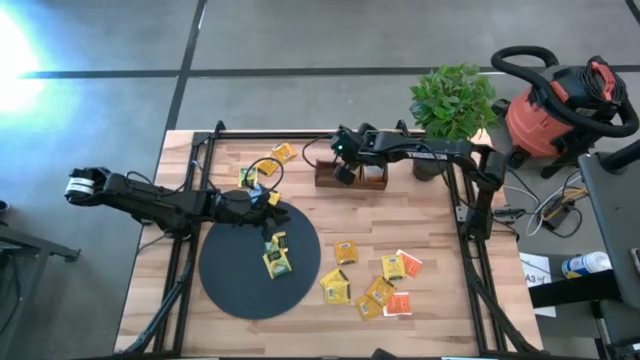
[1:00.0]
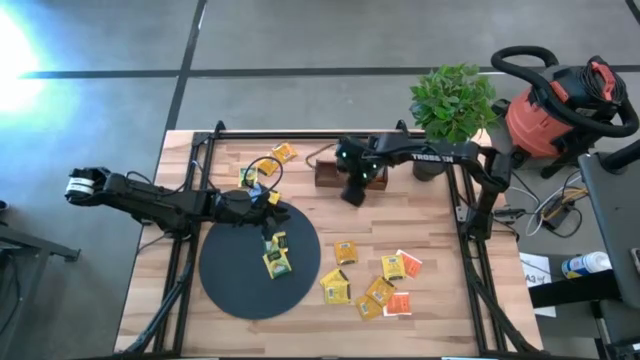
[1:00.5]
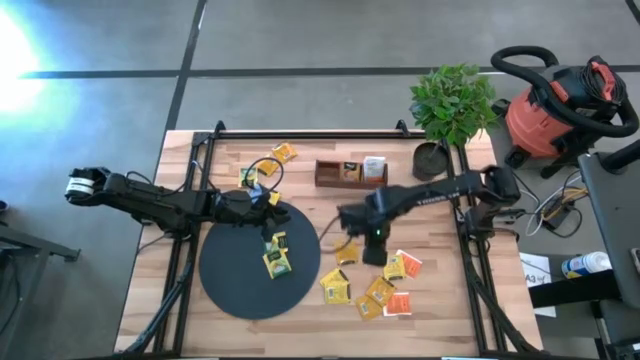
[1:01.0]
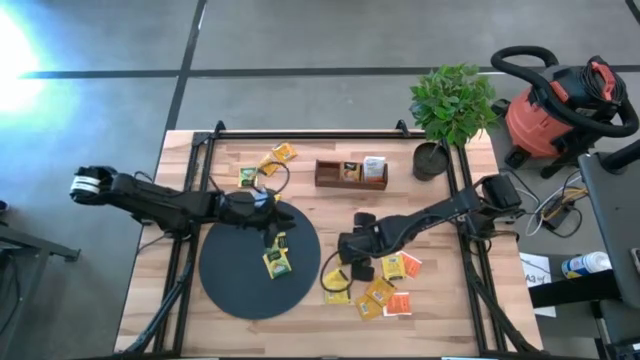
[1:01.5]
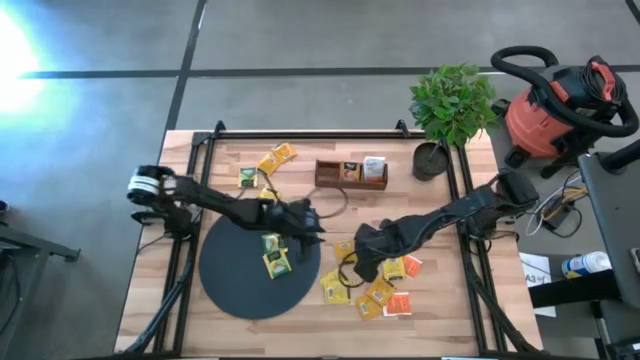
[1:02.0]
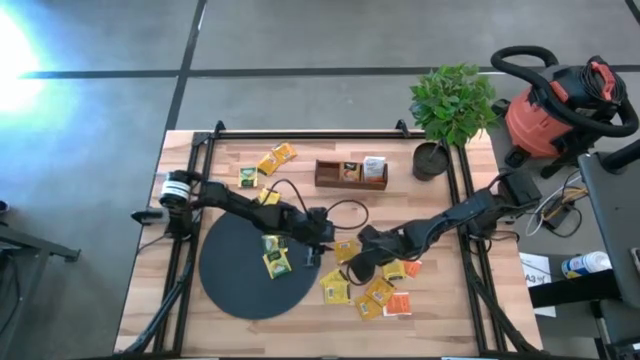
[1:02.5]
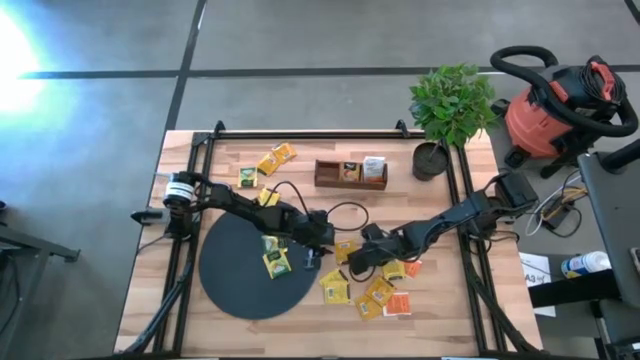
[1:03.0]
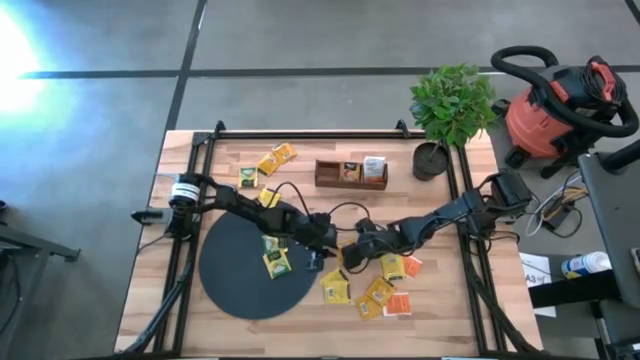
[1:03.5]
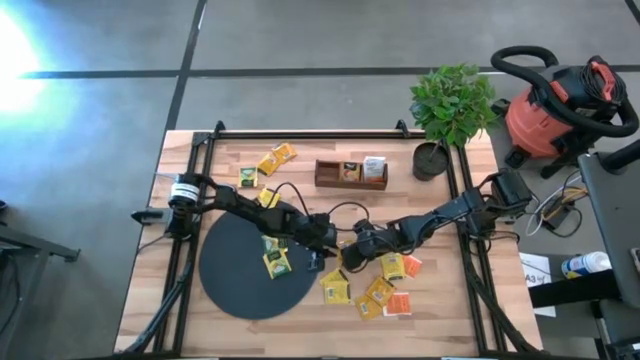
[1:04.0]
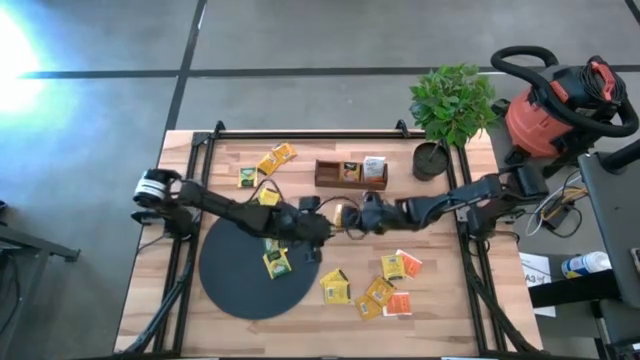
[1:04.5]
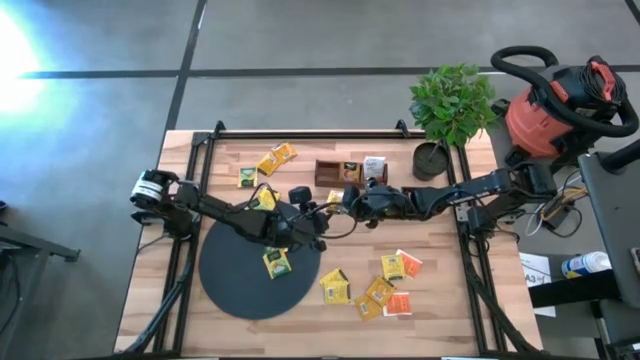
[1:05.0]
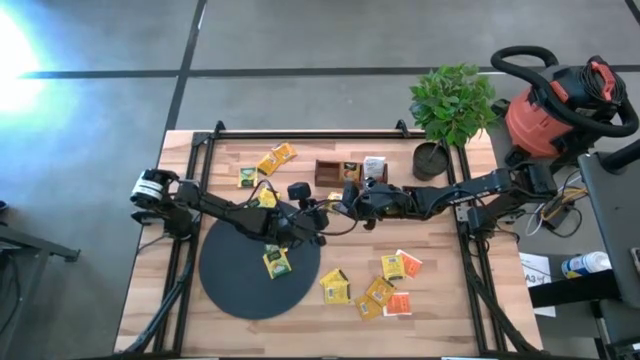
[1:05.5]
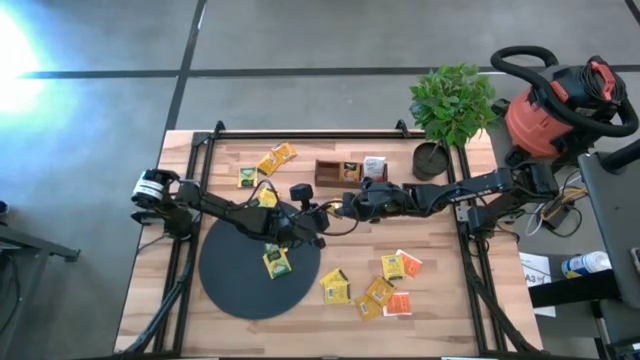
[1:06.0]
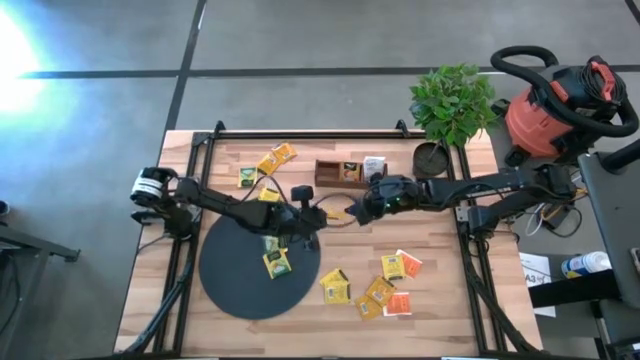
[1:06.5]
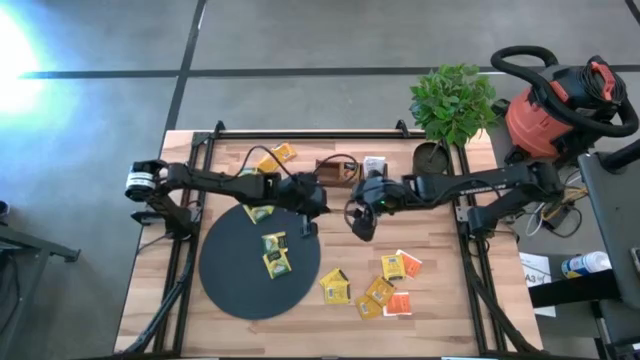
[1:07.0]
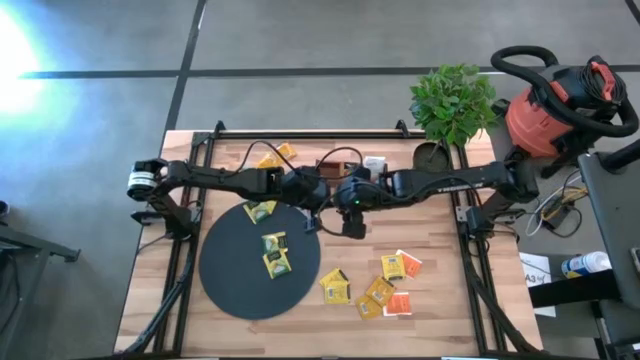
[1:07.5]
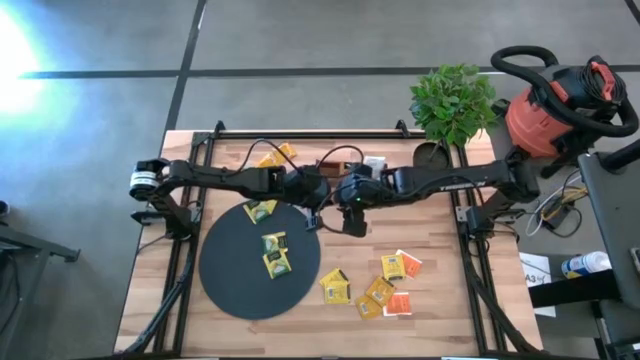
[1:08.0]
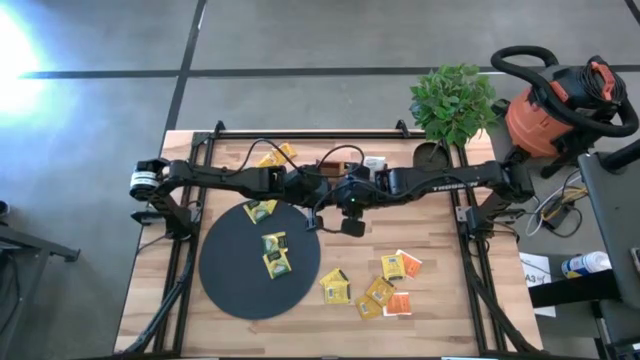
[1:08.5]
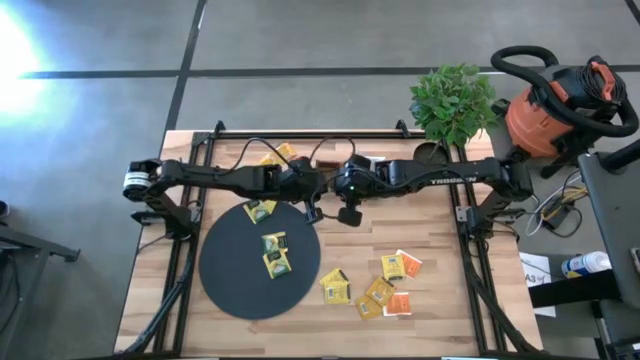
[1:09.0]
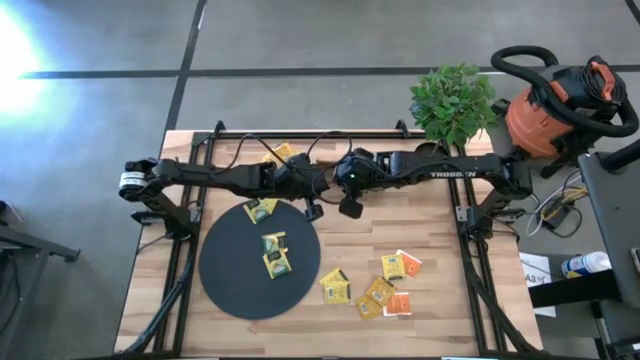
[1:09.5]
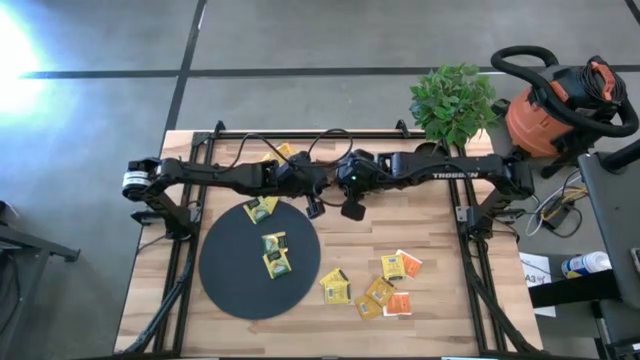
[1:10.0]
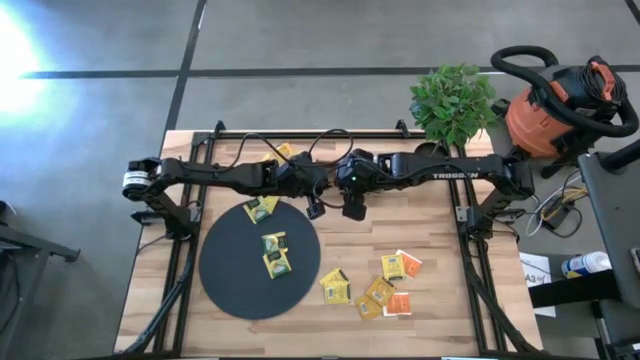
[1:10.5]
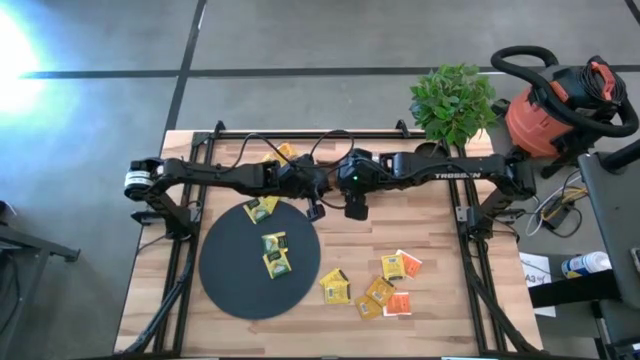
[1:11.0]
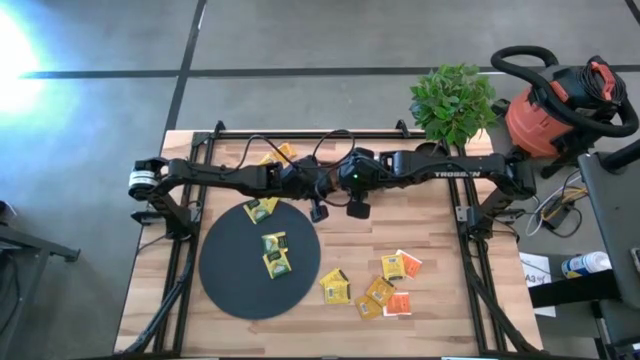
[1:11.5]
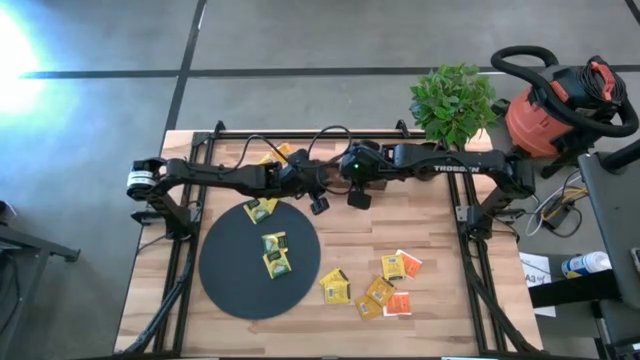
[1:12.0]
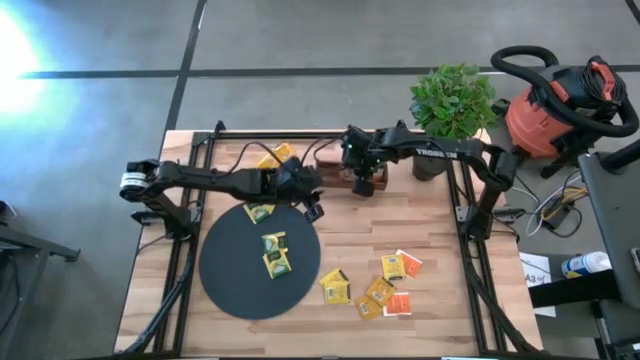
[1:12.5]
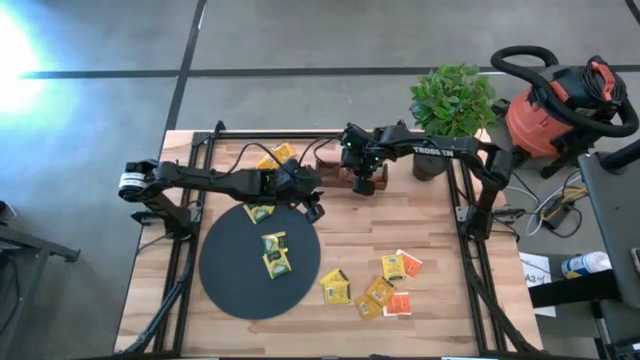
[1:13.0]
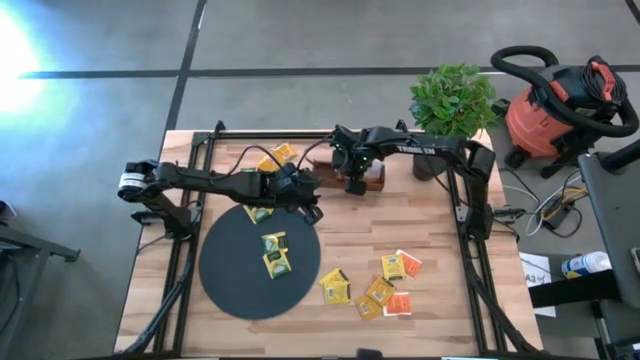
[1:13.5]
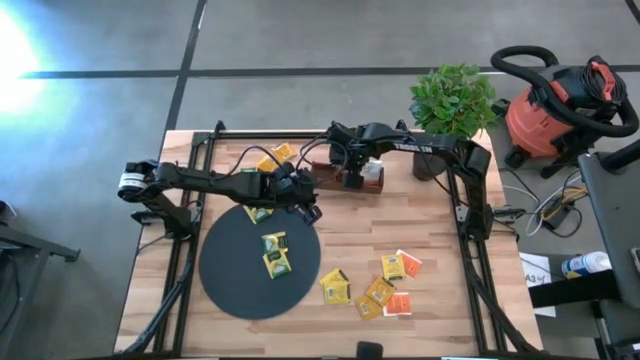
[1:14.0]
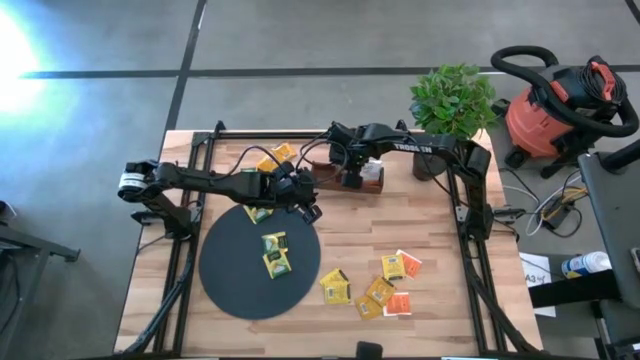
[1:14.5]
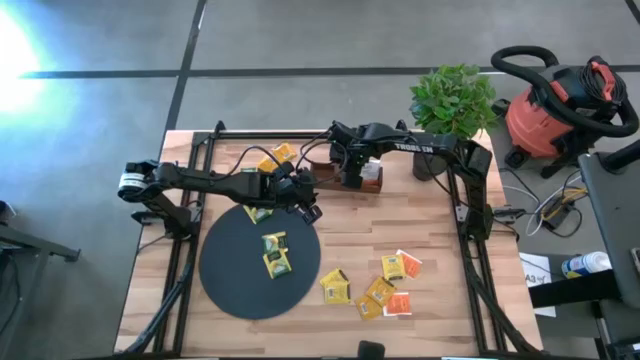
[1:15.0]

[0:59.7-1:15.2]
Task: Pick & Place Tea
Put the orange tea bag into the middle section of the wooden organizer
